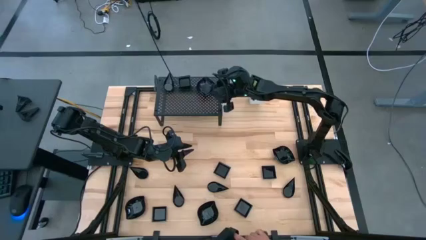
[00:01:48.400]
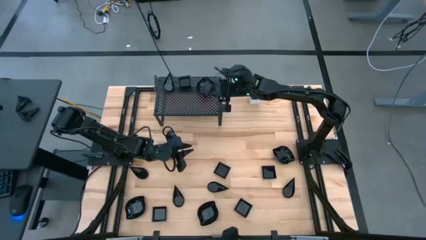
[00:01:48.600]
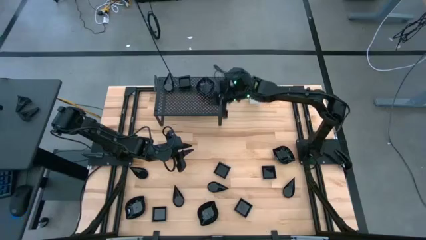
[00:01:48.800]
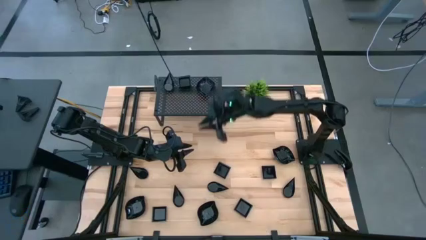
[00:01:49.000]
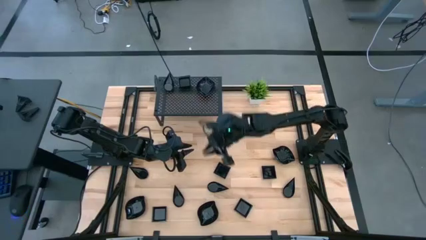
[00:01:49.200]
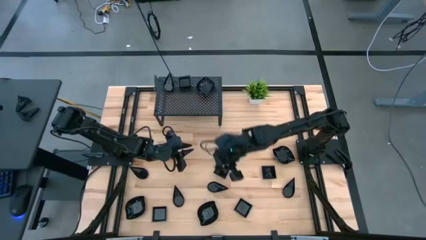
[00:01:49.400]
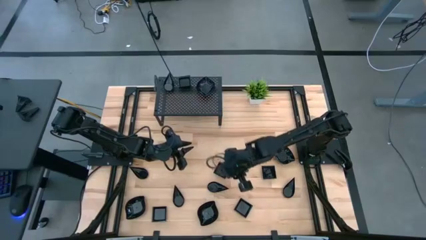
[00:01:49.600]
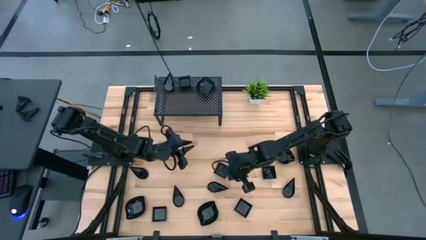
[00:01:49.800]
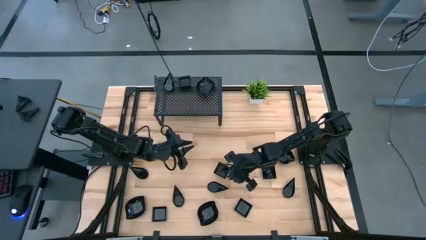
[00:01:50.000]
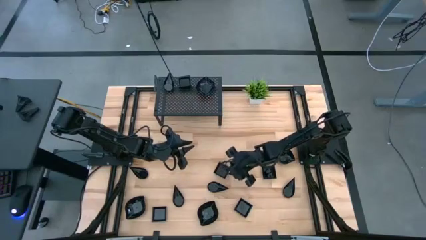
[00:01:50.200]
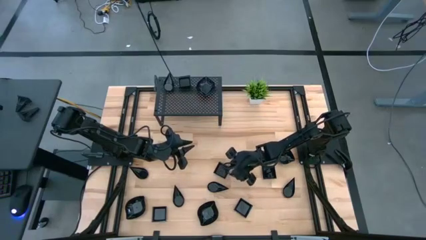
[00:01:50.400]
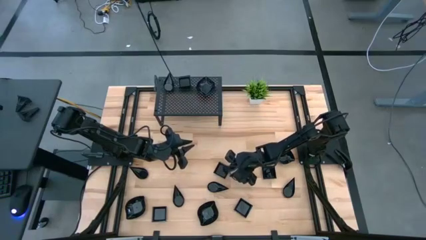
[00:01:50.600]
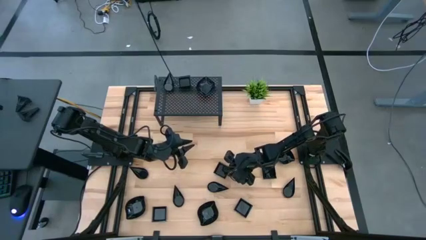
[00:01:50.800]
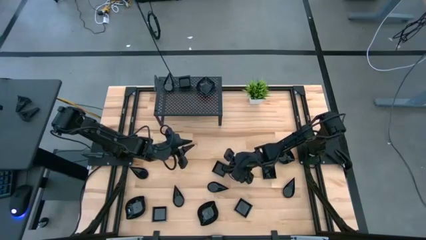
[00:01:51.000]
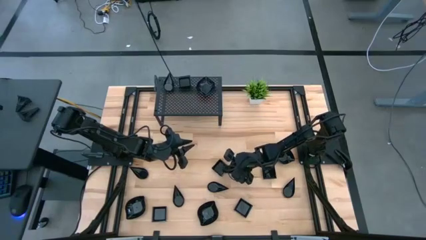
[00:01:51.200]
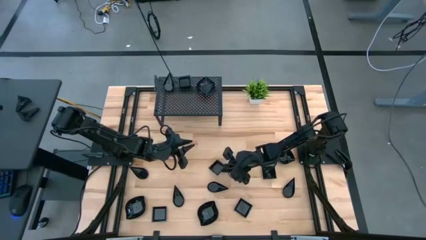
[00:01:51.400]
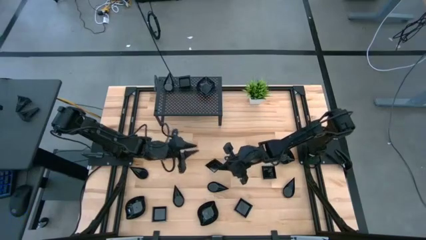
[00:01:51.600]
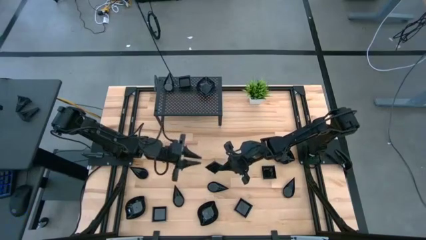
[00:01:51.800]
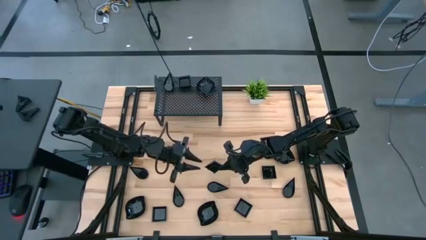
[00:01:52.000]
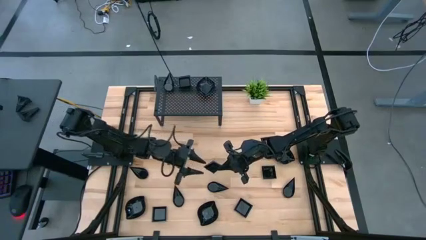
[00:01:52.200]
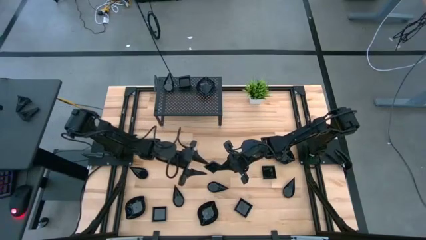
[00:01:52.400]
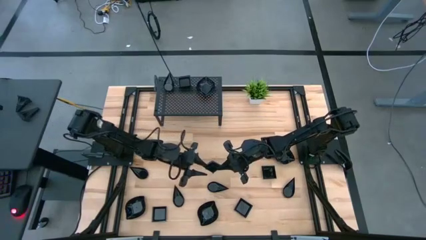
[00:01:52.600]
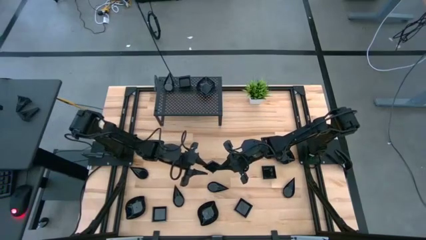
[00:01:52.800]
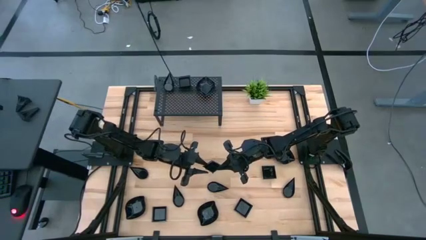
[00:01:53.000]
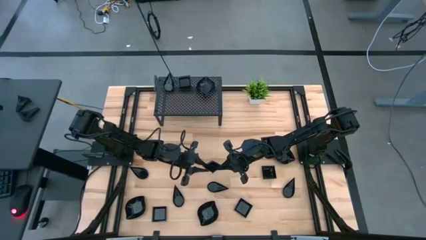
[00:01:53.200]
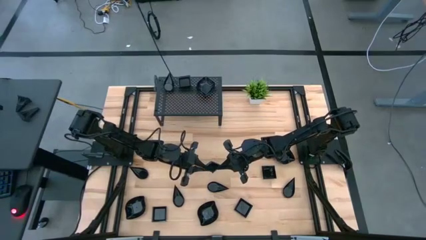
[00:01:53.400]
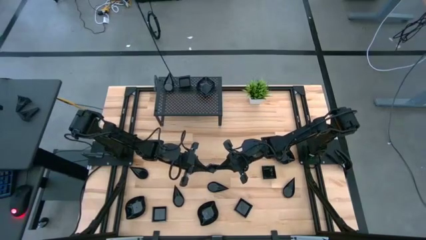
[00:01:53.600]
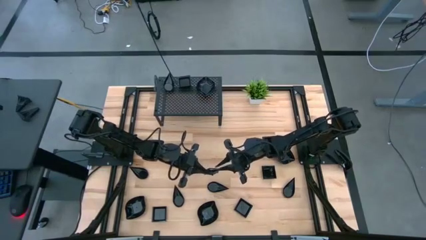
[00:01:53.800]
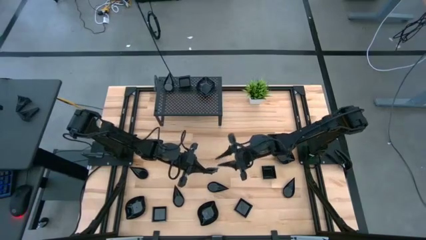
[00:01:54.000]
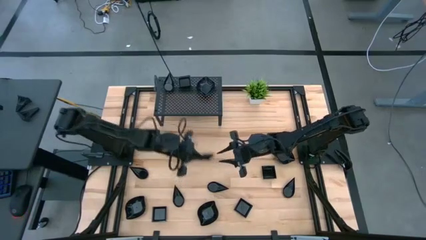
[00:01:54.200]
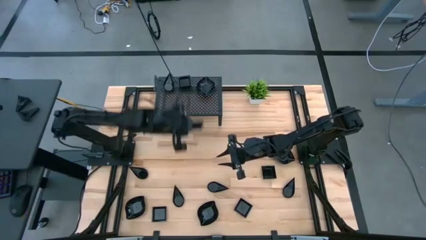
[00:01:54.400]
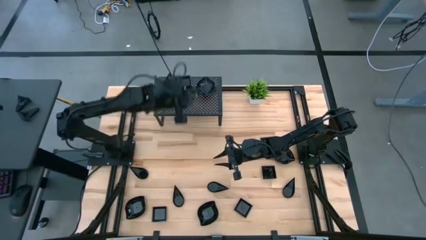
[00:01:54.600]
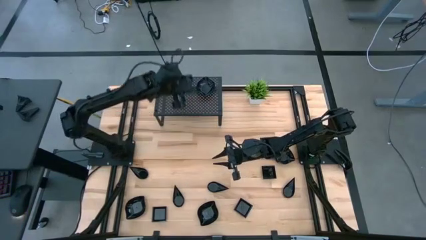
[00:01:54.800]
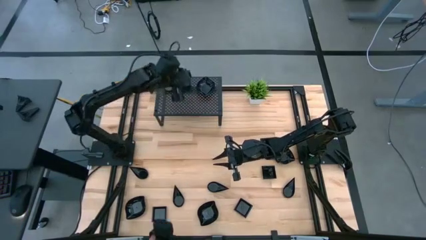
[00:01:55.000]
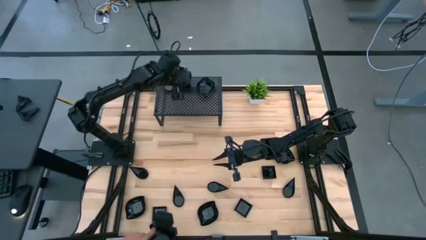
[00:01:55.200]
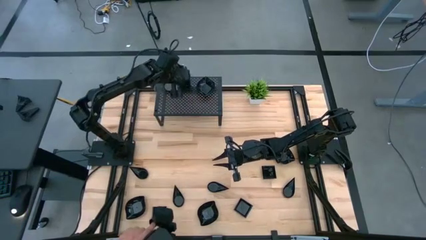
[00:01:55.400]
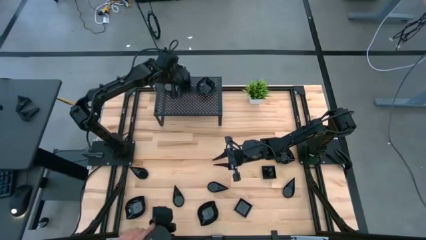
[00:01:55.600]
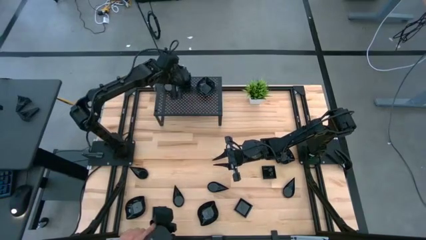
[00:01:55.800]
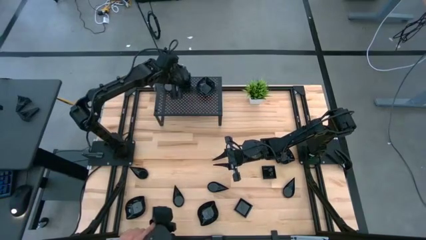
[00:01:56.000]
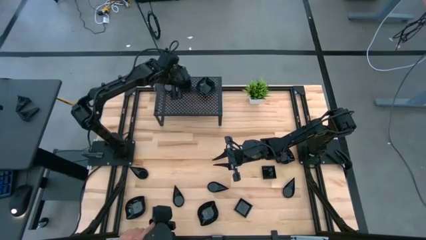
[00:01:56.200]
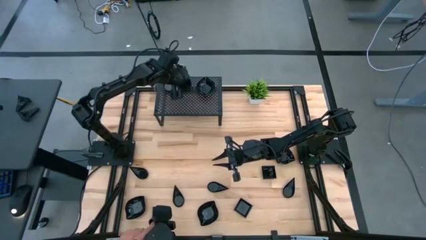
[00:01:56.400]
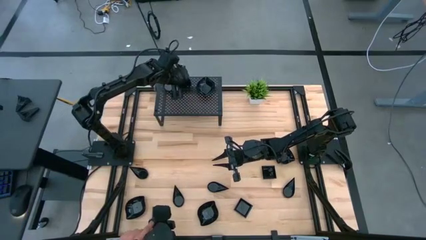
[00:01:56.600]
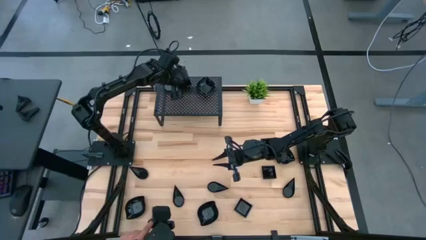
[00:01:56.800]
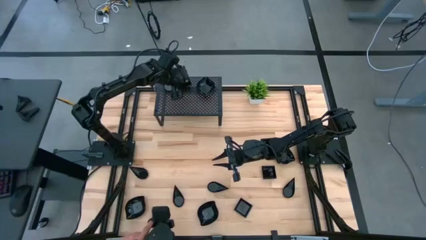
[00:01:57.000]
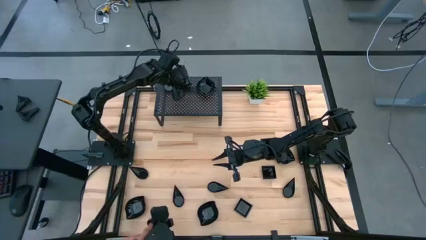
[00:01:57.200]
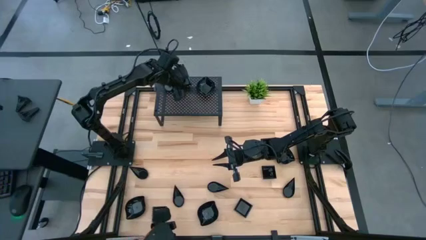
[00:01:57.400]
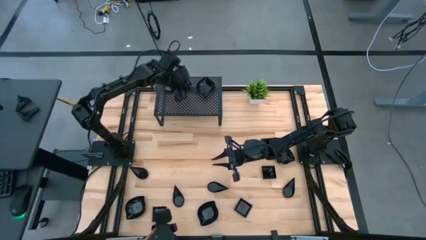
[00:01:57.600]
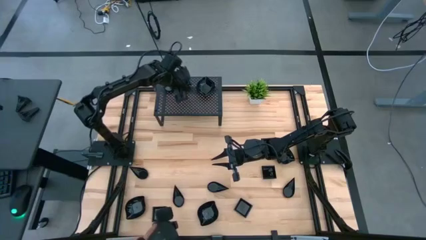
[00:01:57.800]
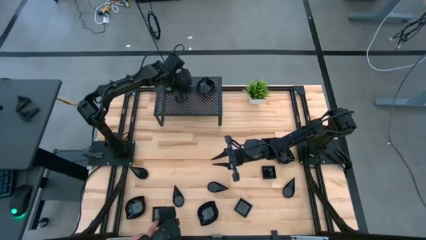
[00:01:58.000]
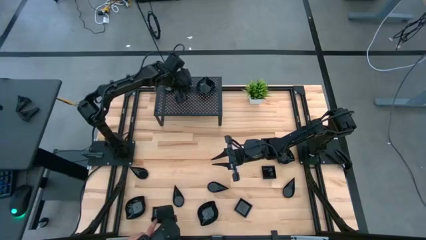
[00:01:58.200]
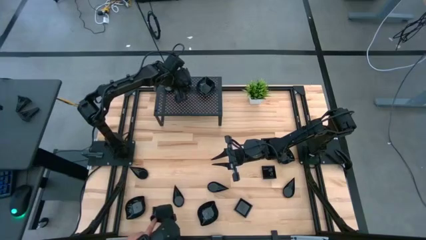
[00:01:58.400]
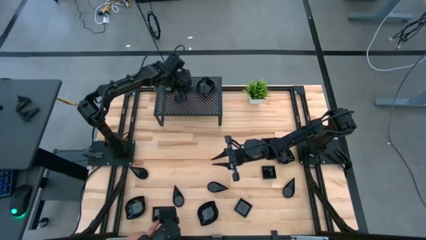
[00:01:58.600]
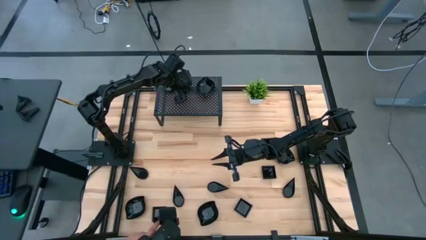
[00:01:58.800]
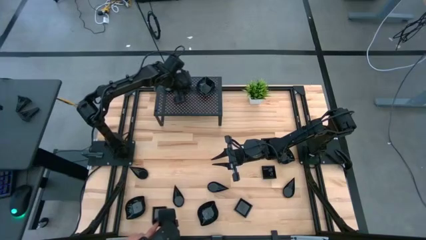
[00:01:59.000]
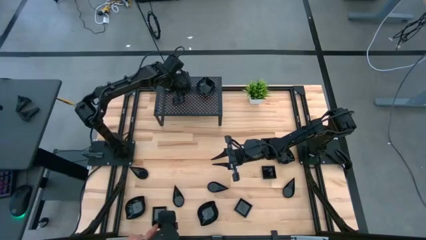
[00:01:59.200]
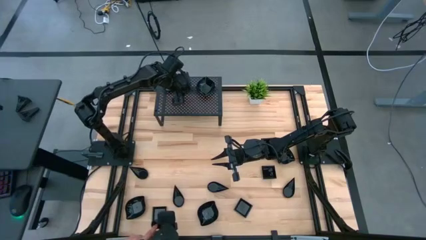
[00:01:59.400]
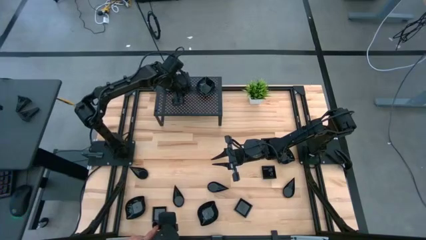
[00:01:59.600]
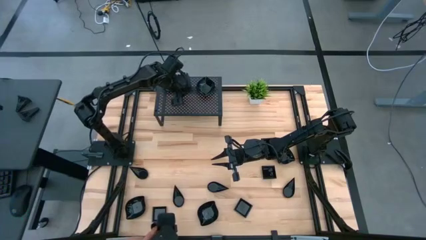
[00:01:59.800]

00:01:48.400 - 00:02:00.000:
Task: Pick & Place Mini shaped plates
Stack the black square plate on top of the square plate on the shelf

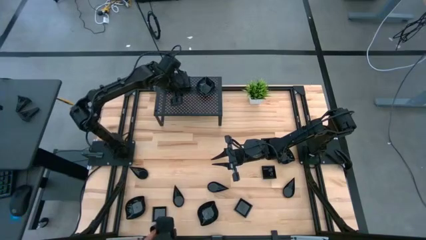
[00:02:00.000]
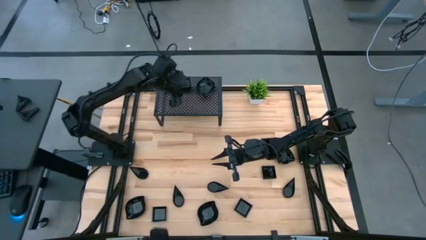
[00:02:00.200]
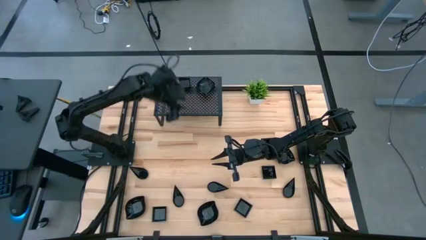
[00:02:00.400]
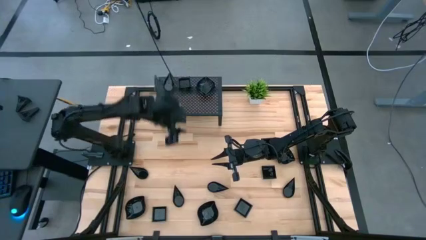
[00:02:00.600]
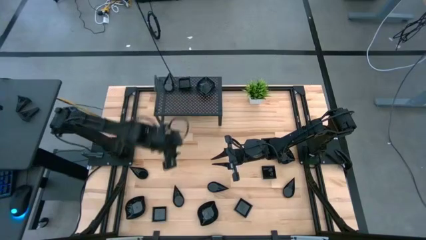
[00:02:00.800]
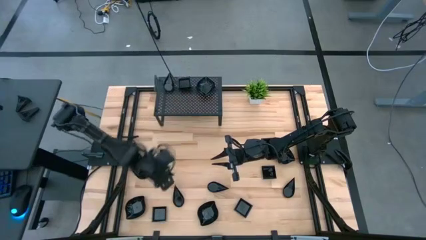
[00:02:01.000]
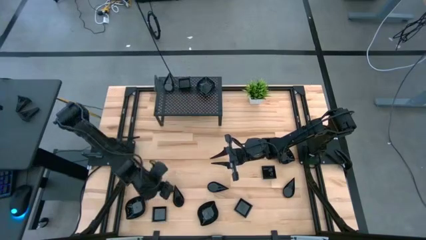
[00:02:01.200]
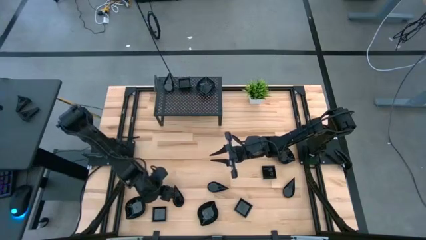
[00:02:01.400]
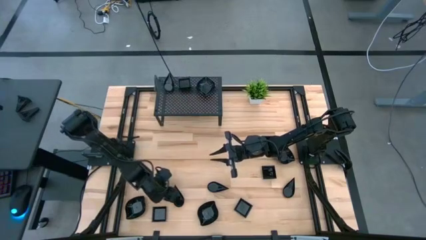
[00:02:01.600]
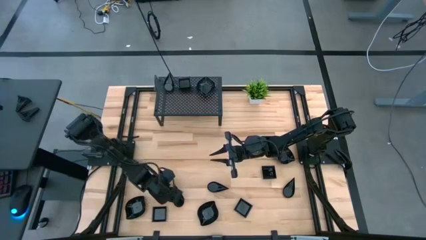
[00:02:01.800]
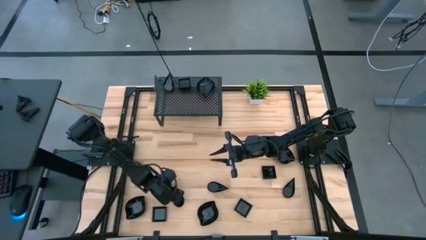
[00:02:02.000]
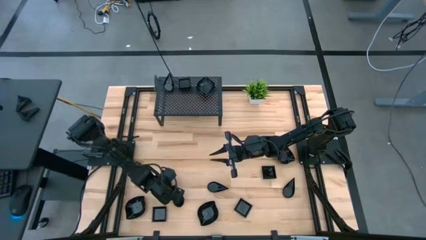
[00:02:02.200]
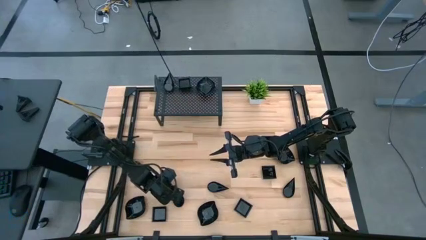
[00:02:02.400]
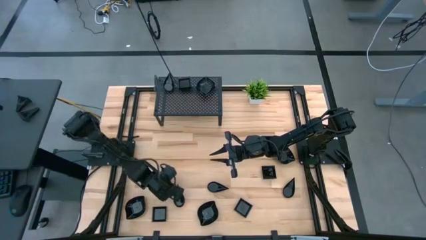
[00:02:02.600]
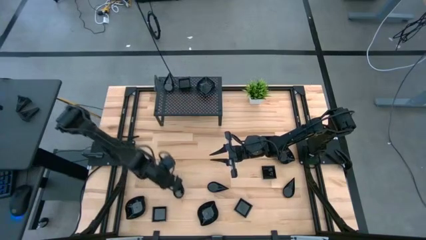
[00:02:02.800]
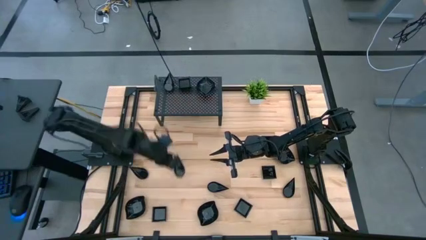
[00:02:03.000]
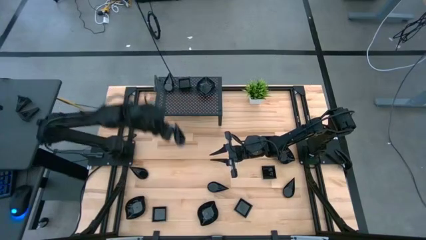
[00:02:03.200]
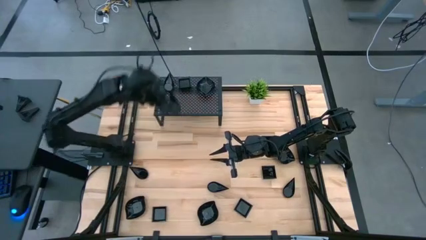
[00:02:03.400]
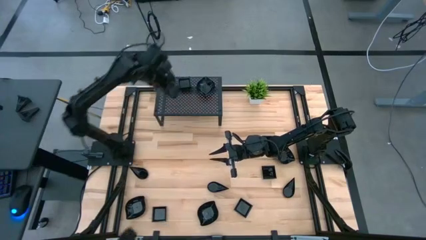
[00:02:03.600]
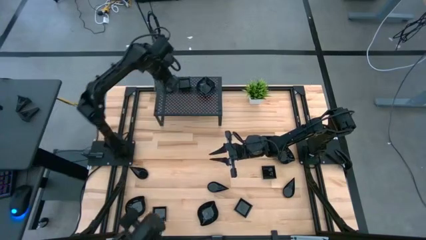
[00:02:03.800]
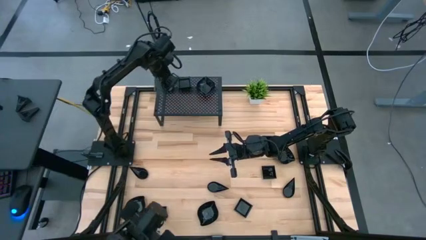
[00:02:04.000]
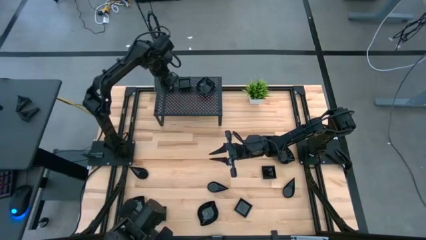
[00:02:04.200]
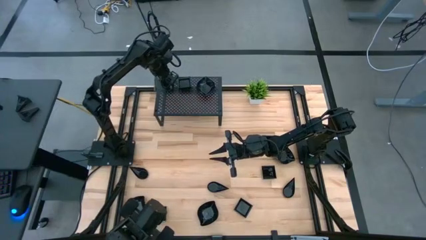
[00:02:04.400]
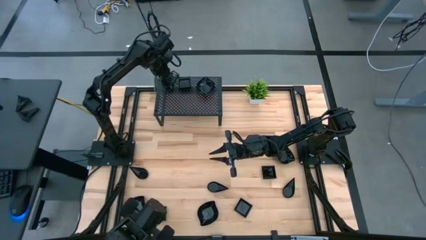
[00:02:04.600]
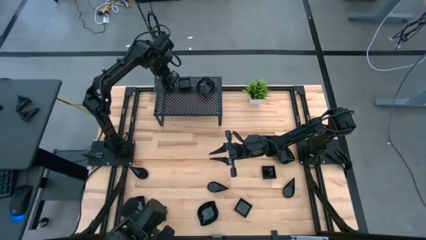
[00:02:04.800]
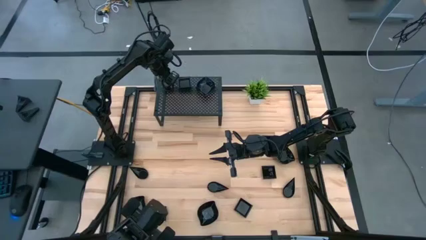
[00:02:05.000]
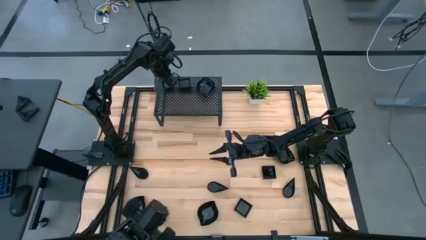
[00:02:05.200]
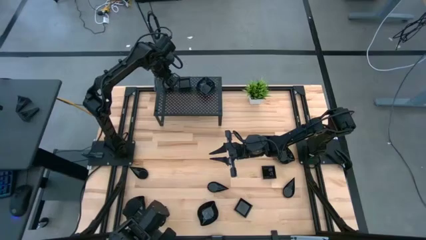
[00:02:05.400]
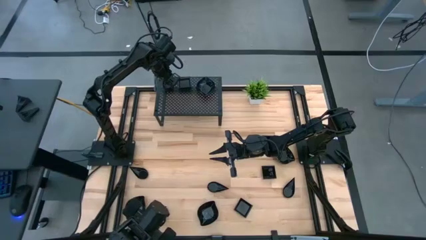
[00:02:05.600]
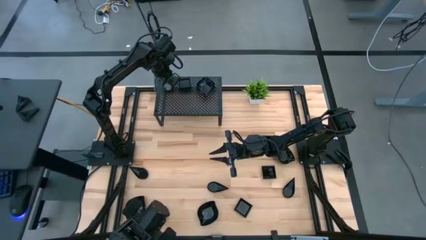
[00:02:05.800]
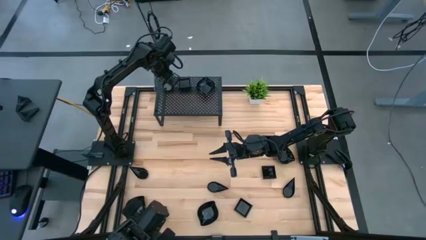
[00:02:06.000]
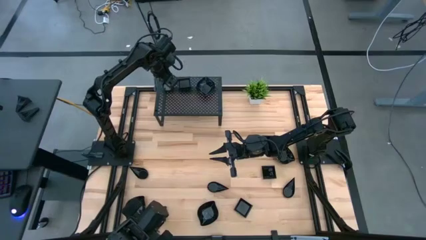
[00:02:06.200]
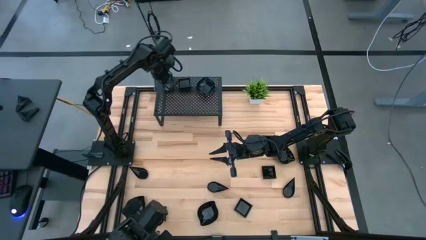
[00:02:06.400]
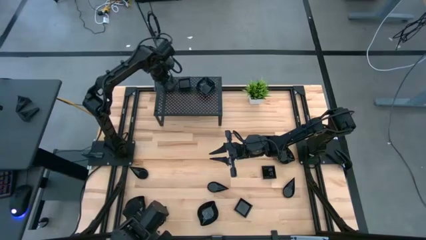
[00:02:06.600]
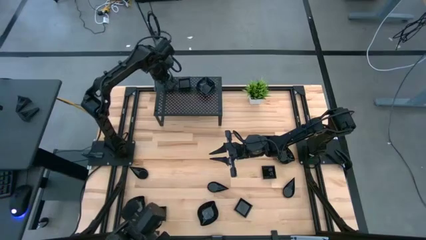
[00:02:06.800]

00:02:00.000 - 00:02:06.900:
Stack the black drop-shaped plate on top of the drop-shaped plate on the shelf
